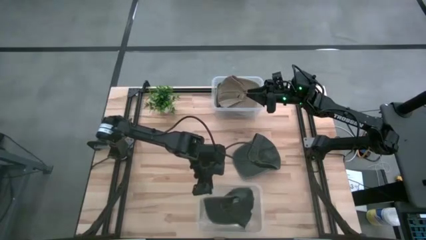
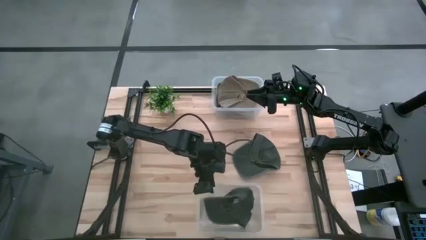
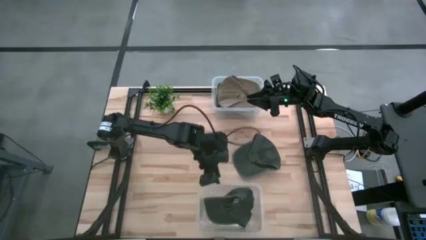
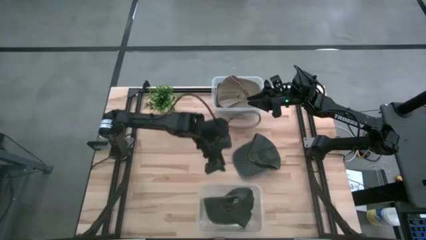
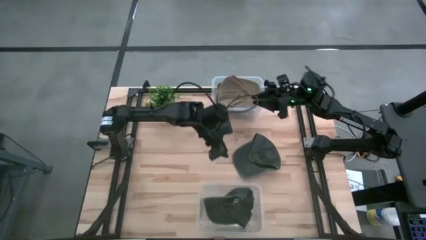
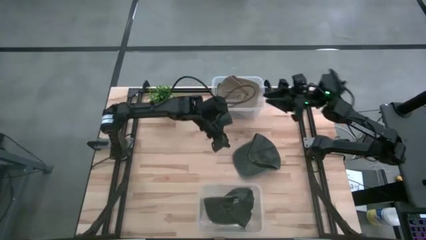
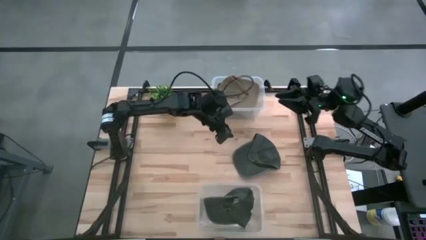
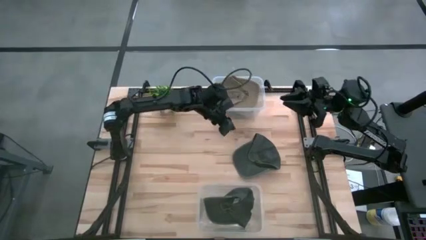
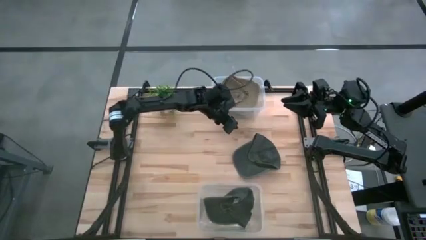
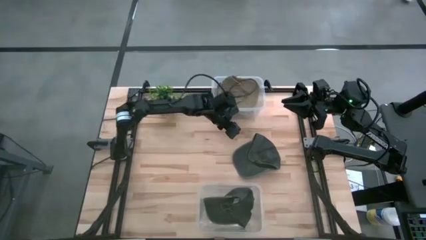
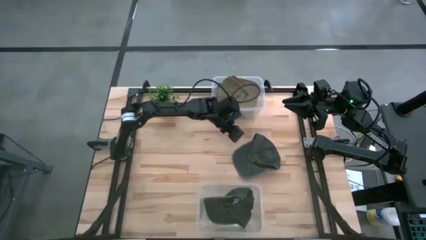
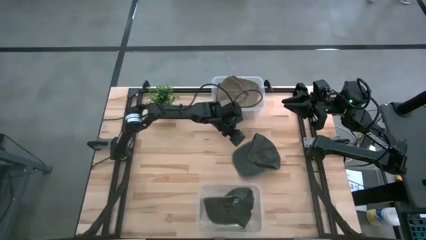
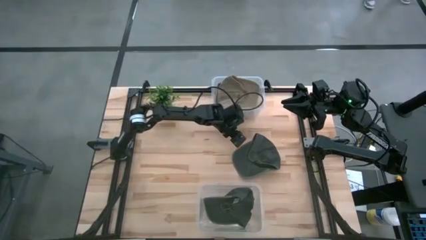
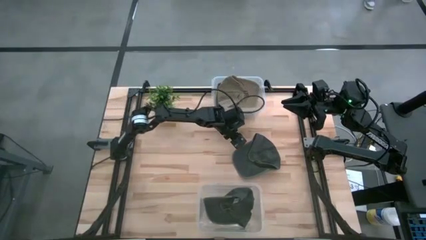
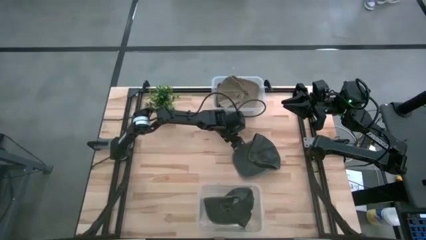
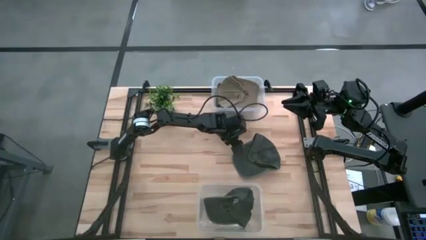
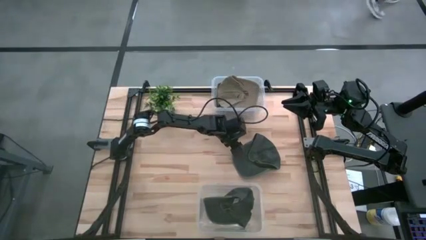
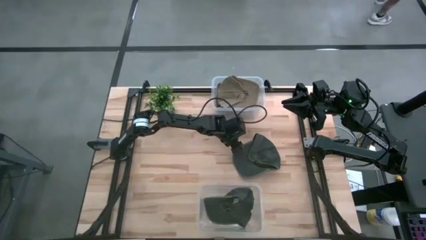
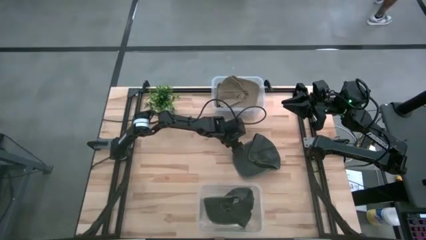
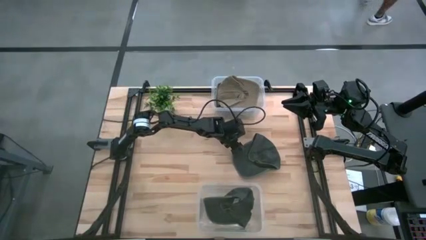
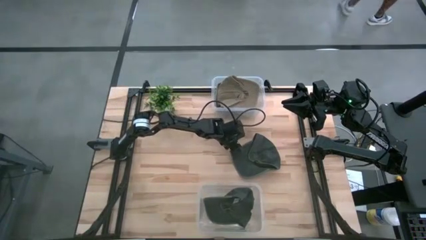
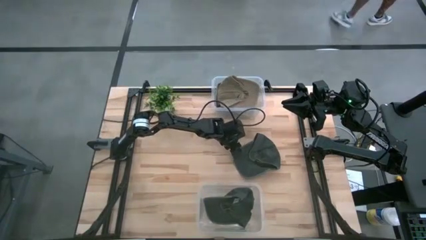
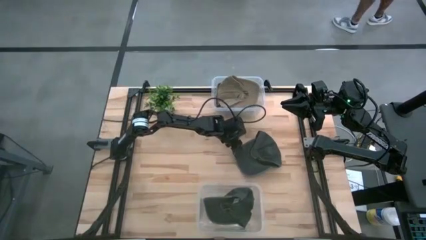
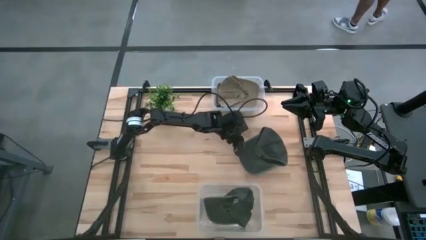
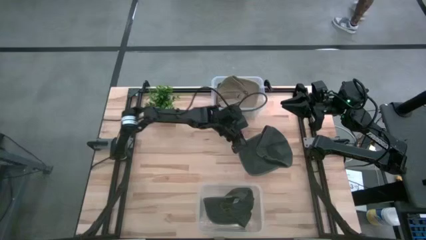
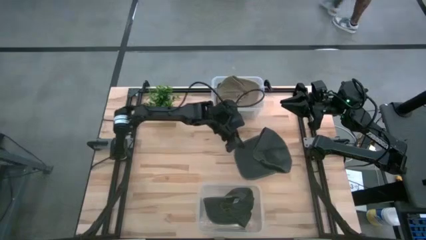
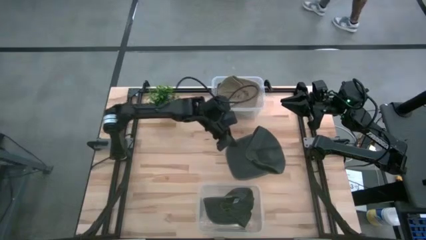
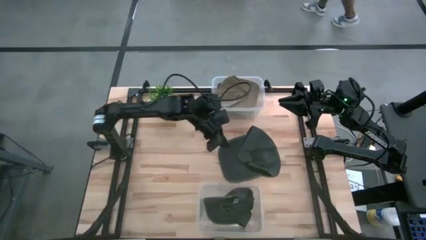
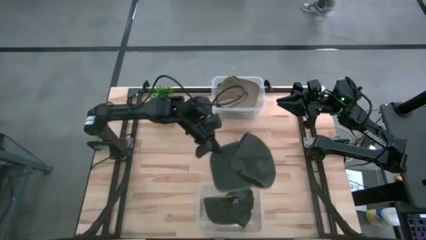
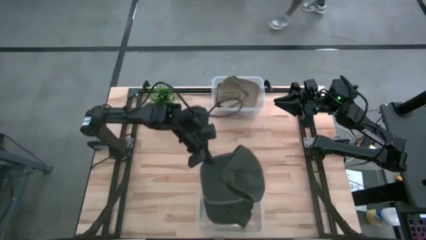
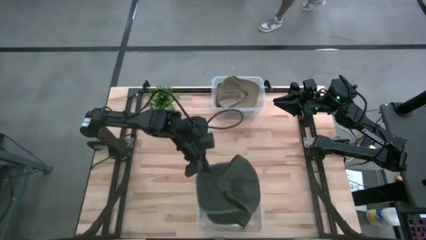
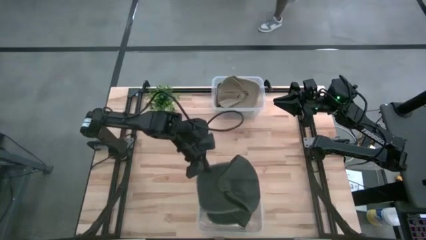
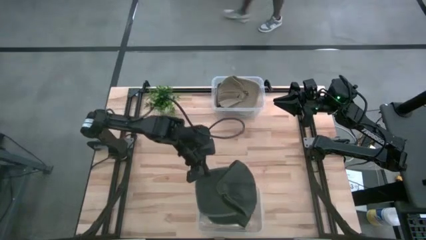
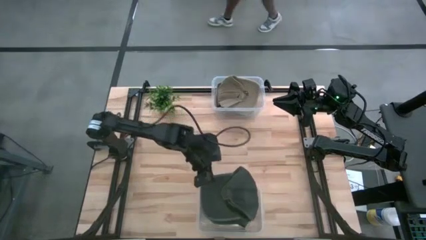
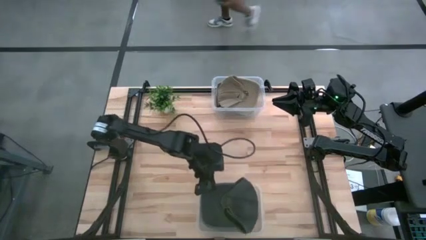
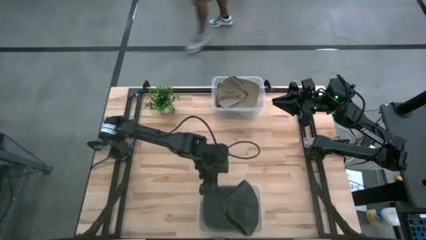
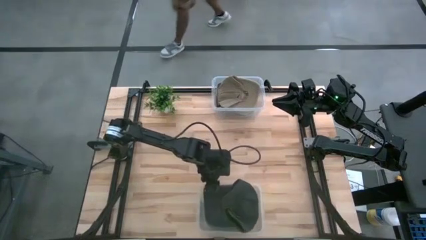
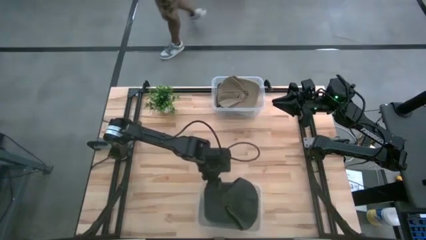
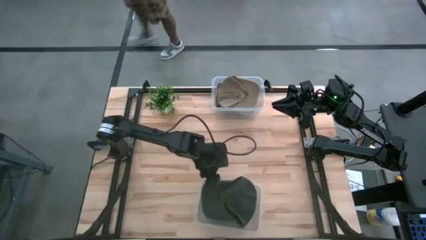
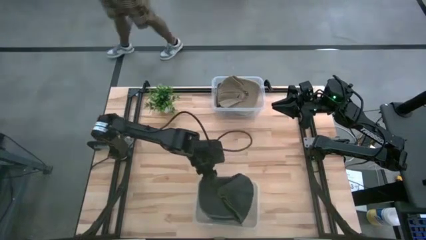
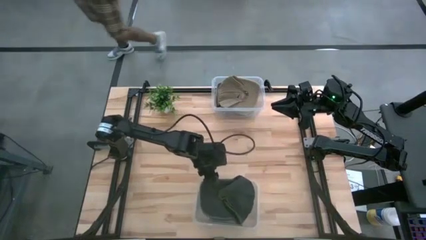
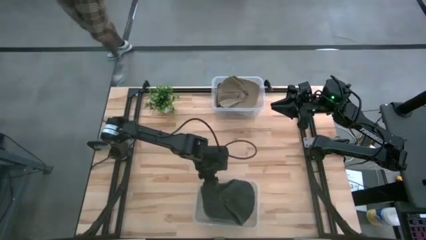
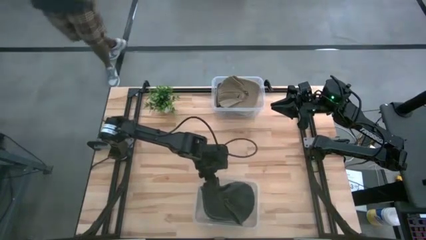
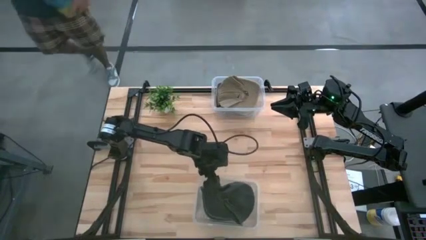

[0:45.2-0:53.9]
Task: Pick & Place hat
Put the black cap into the bottom transparent bin

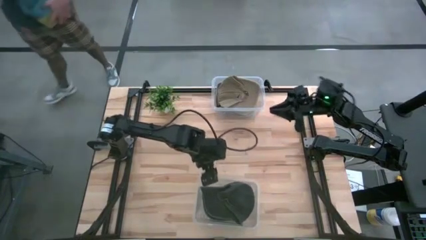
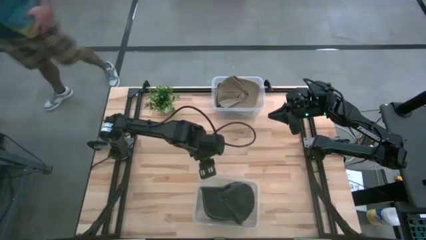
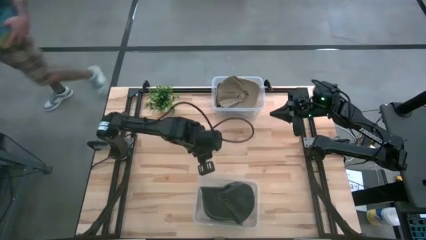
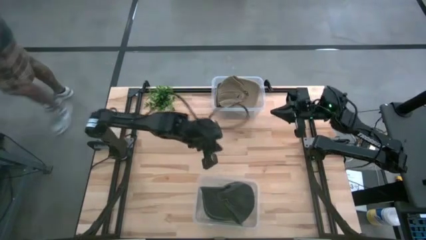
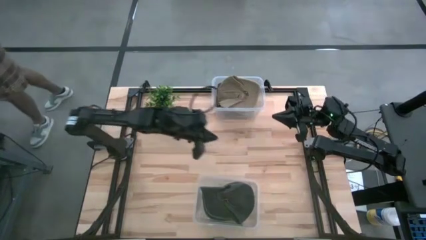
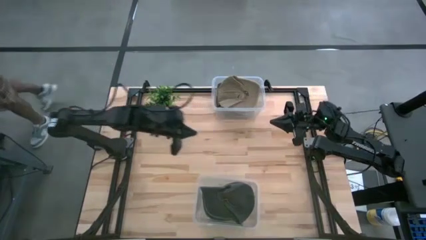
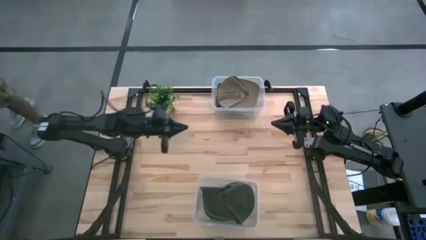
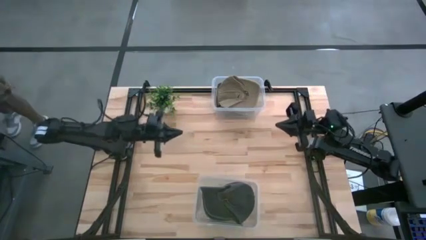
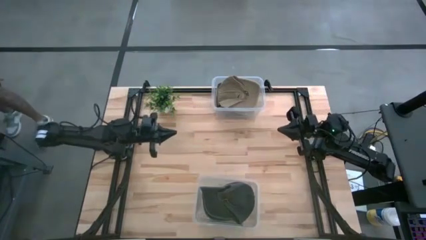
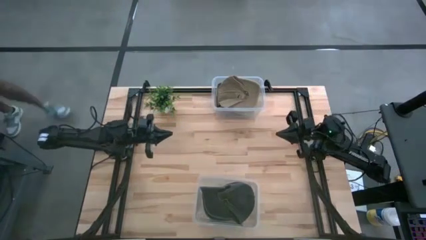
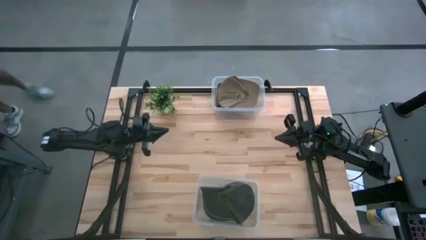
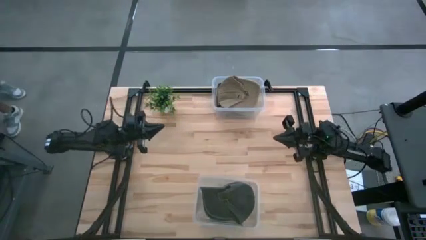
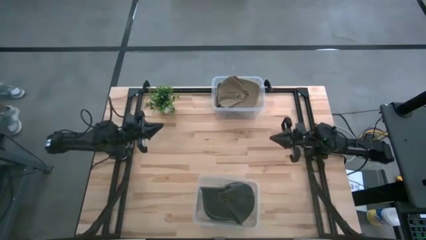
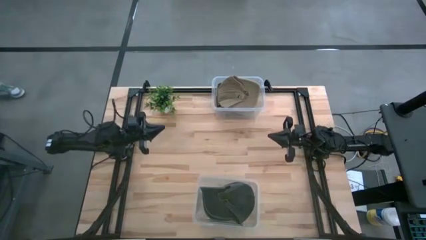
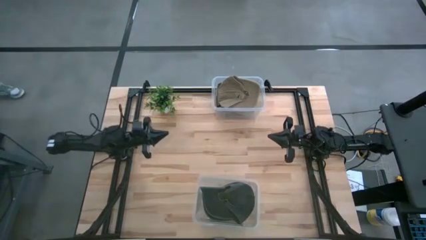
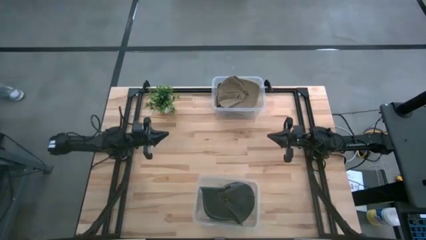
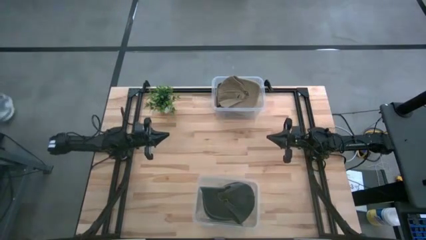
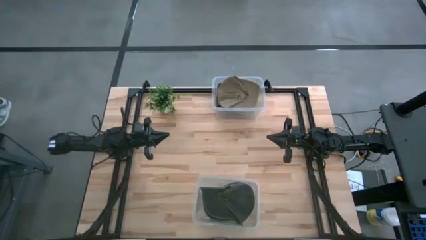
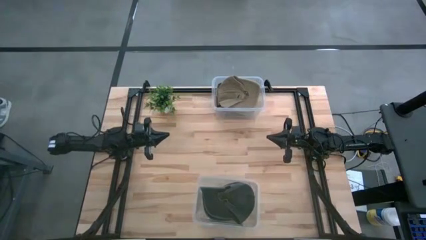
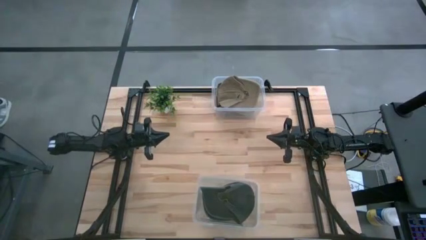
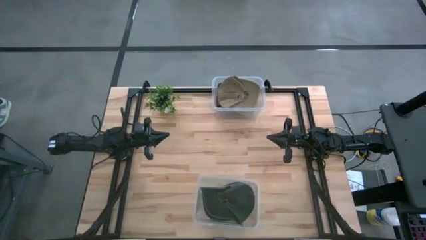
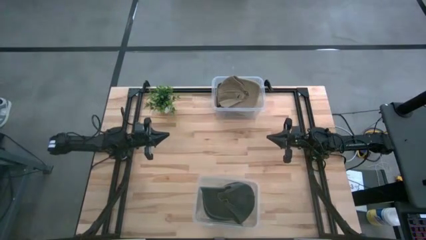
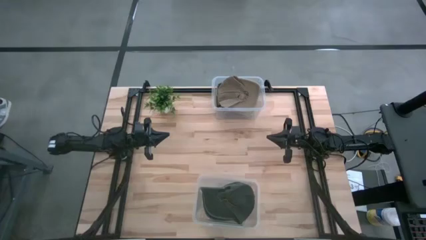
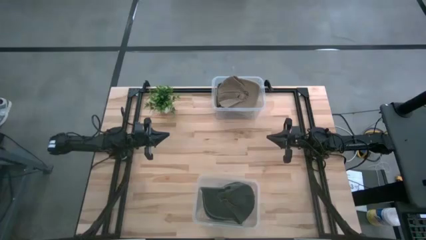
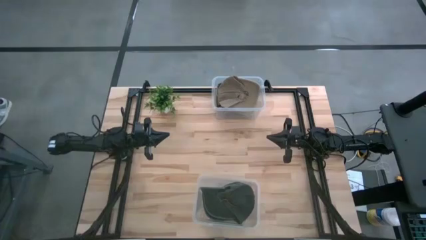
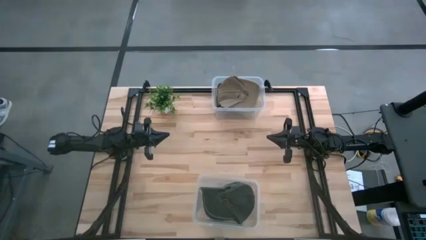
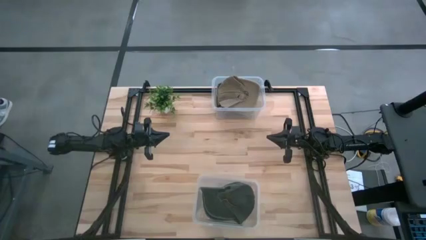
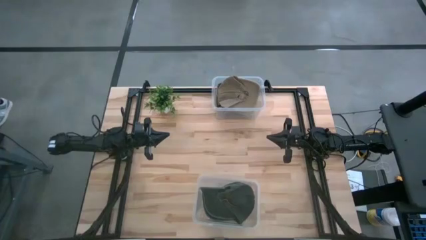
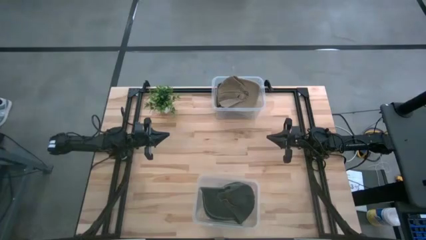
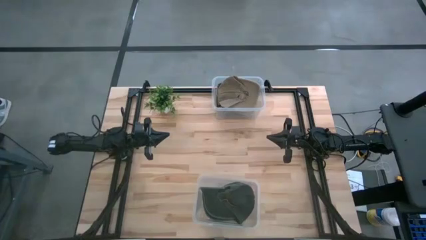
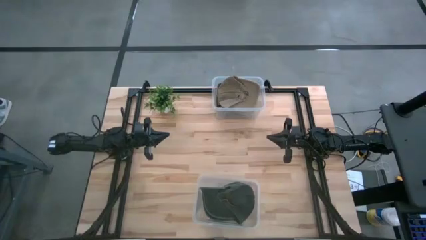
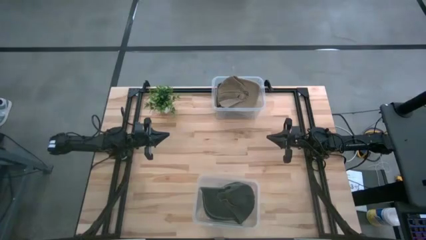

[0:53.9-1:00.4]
Return to Home Position
